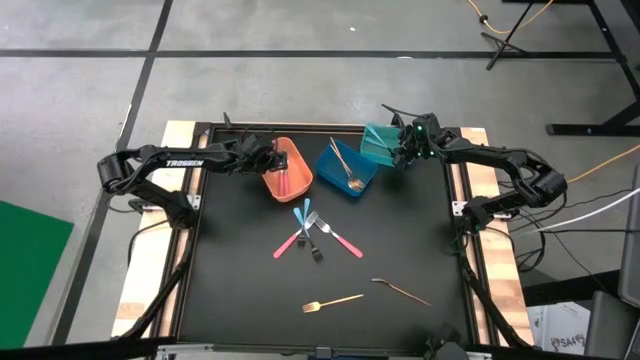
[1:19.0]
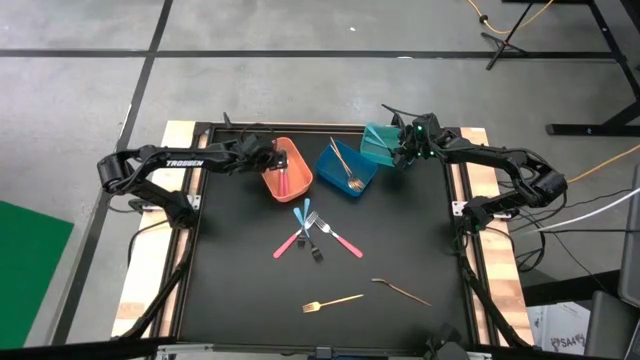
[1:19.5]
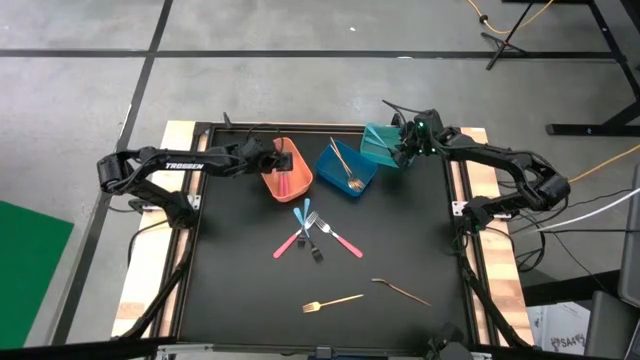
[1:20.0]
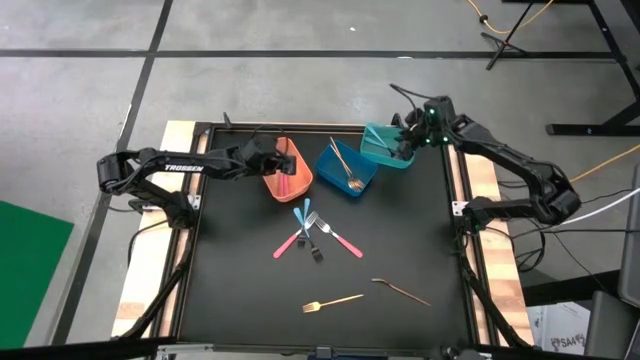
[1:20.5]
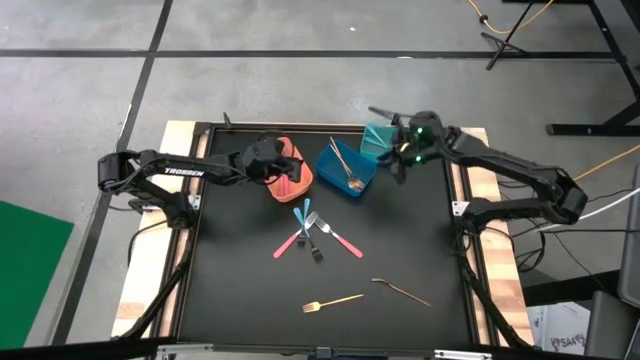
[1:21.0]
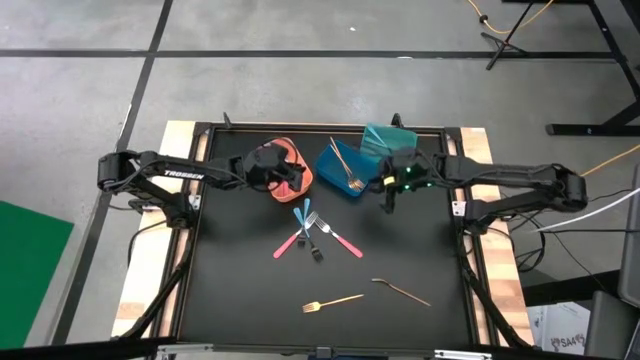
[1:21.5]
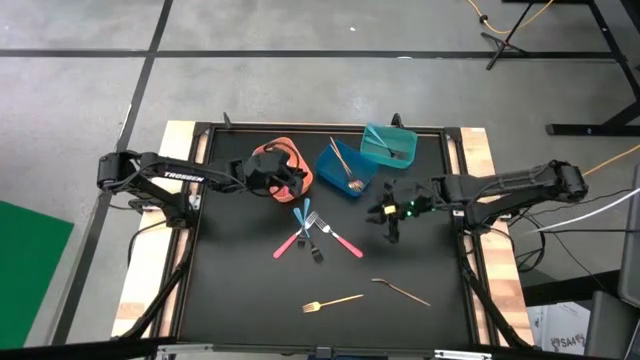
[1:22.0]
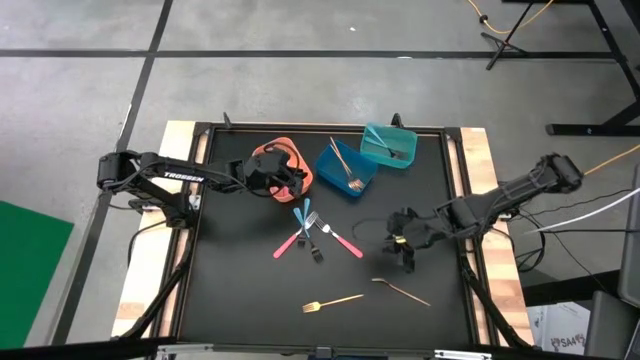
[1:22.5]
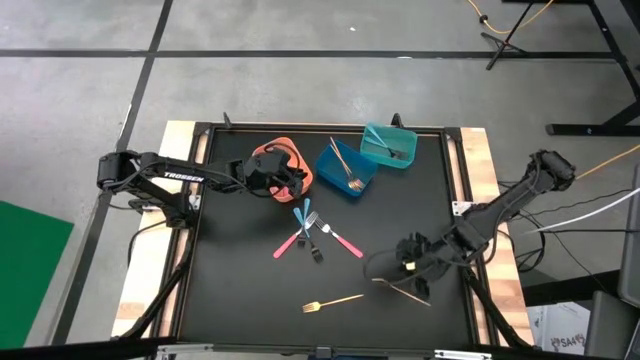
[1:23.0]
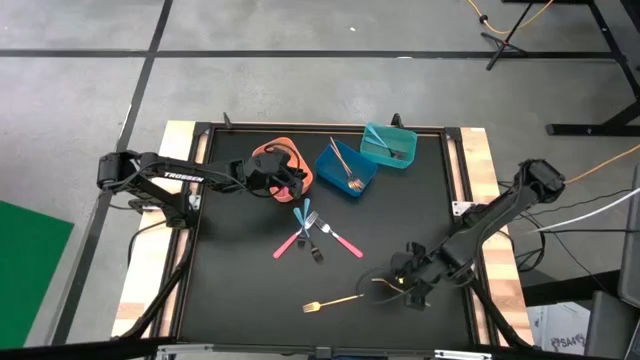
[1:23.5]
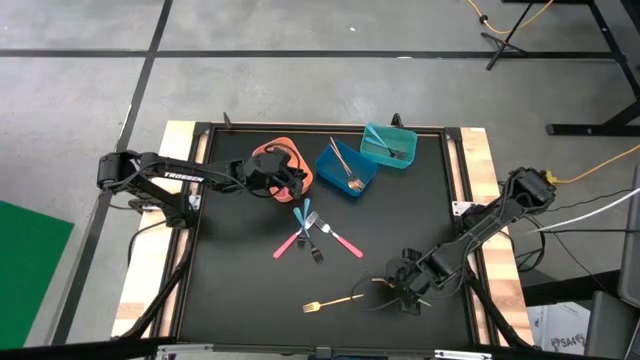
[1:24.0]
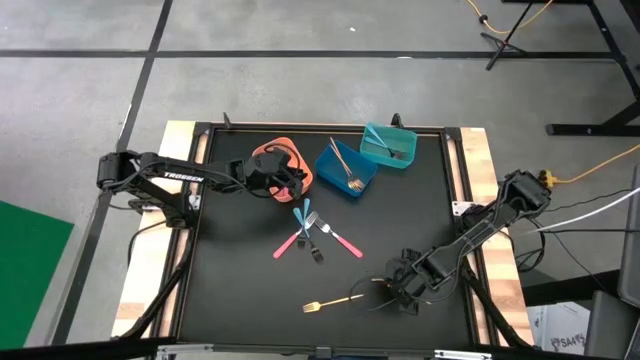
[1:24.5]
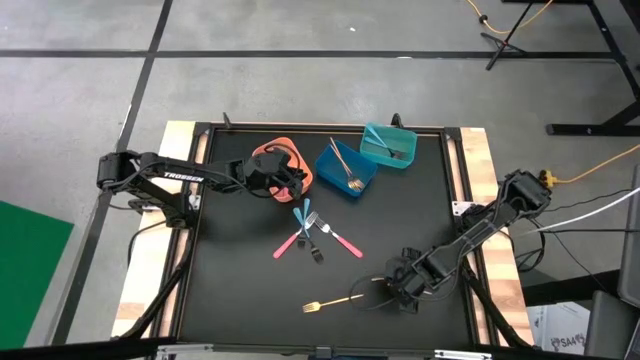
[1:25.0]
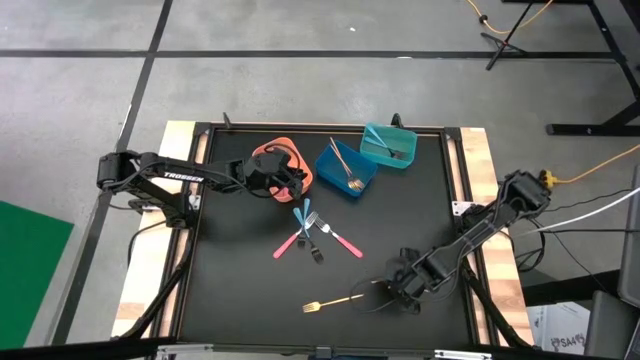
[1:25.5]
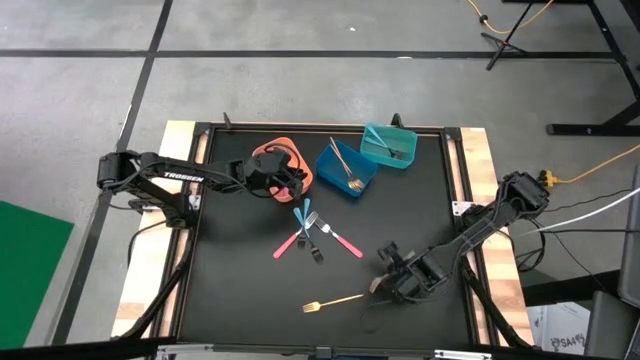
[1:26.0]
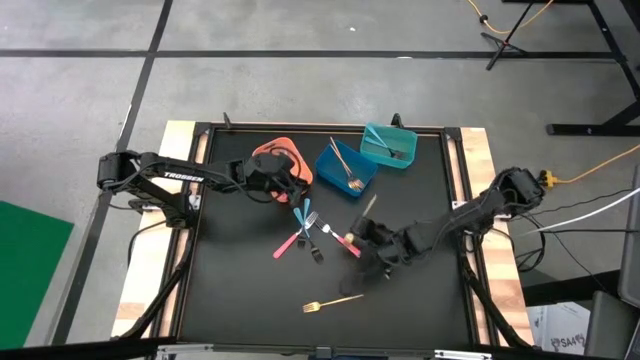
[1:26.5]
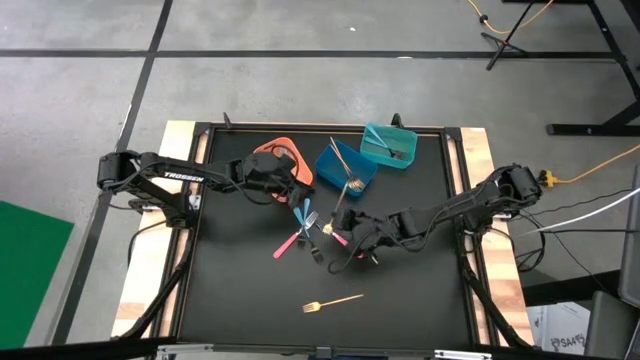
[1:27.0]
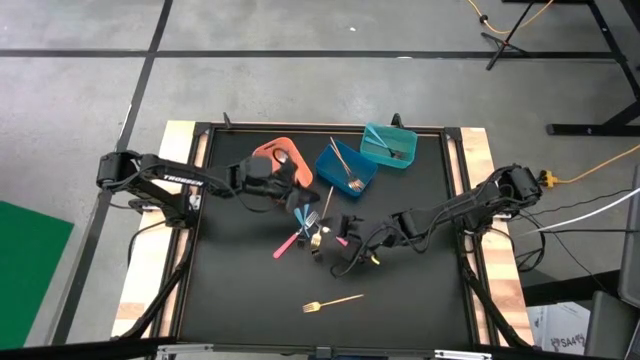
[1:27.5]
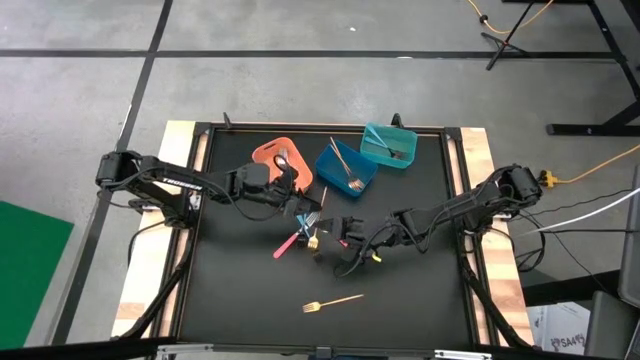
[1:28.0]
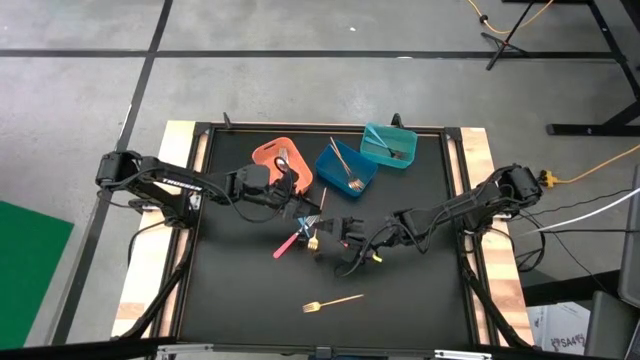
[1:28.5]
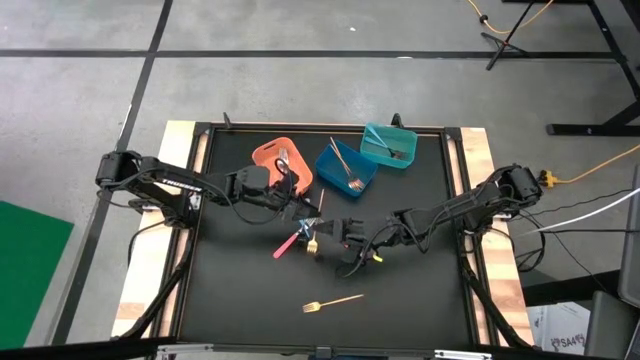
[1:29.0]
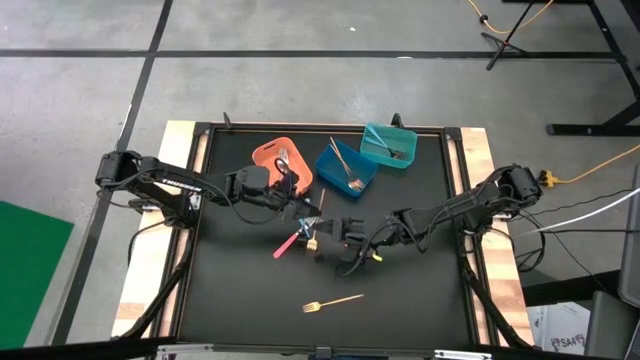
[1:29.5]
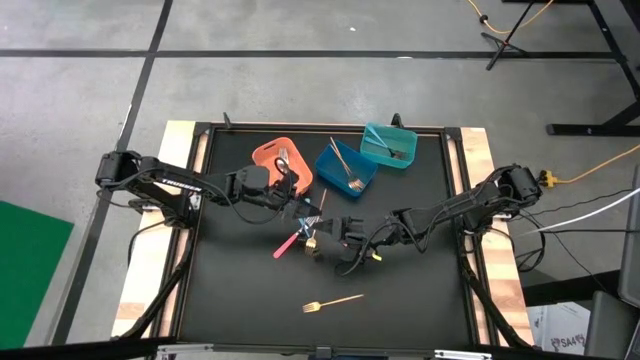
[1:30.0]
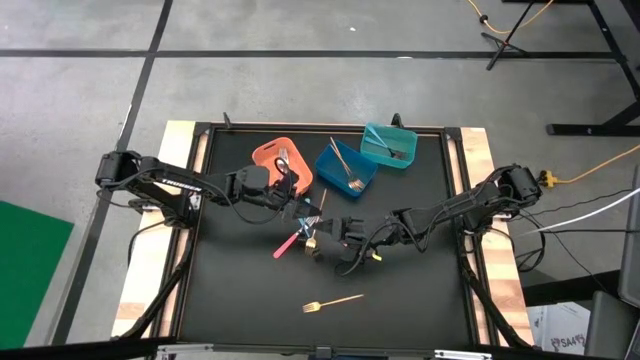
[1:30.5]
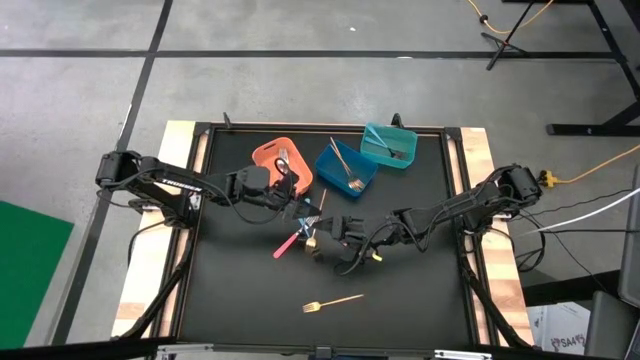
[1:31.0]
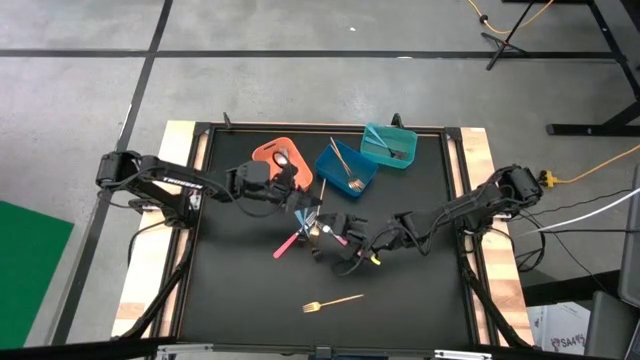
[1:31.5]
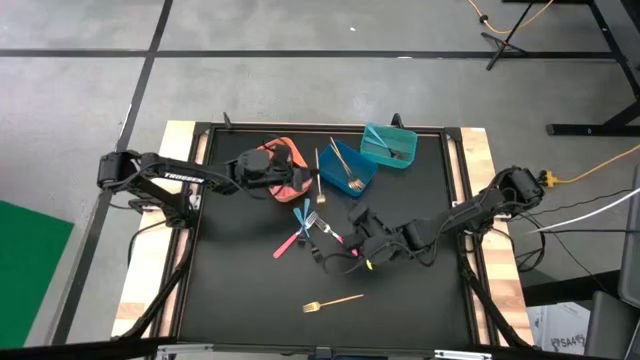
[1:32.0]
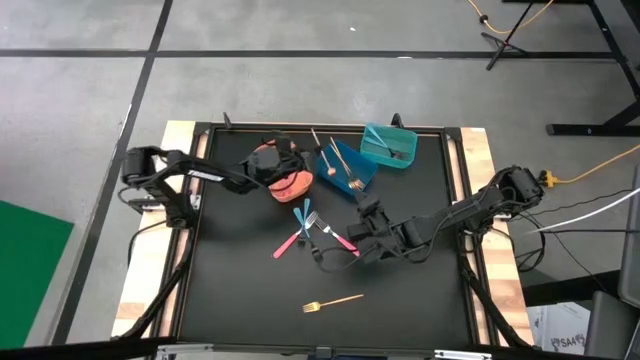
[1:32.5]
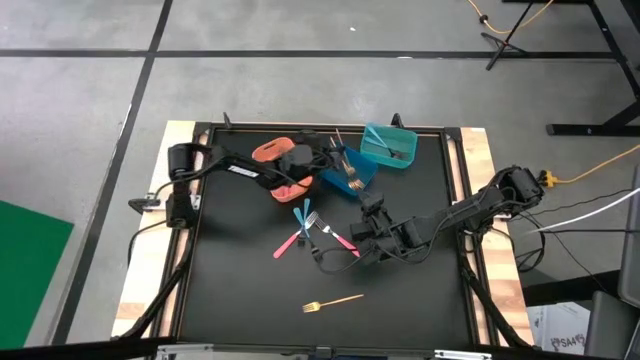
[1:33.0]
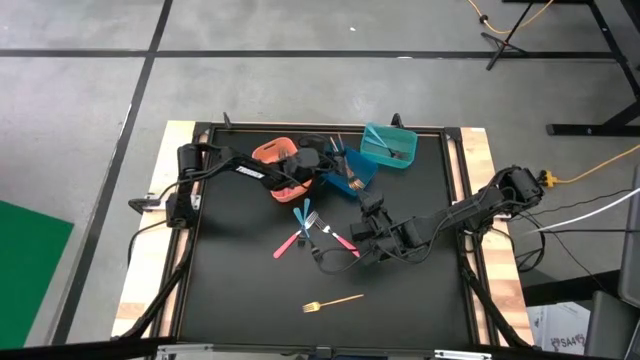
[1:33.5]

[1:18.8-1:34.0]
Task: Sort silverware by color (type)
Put the gold fork into the blue bin

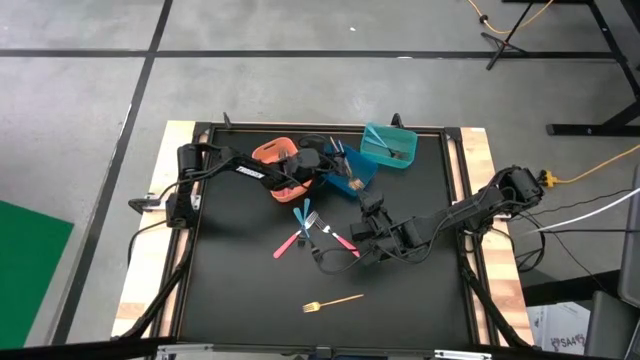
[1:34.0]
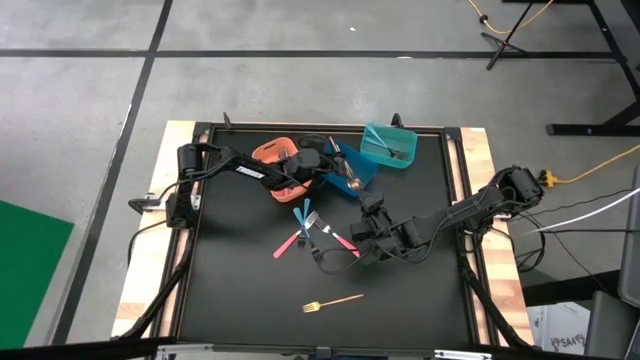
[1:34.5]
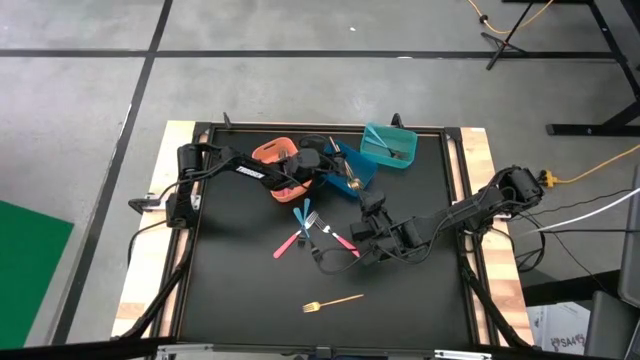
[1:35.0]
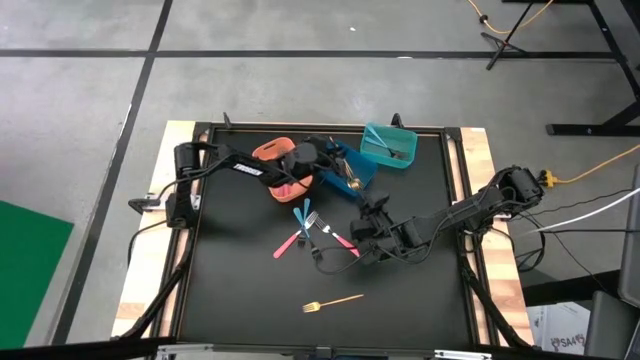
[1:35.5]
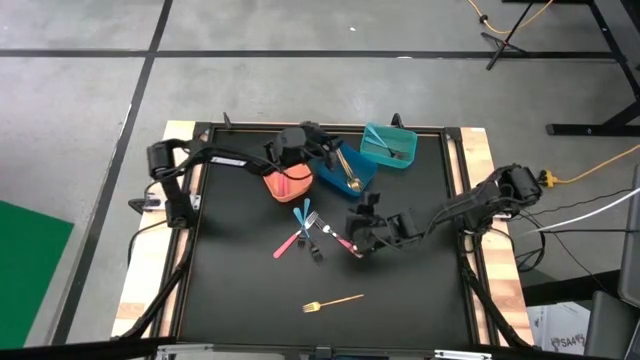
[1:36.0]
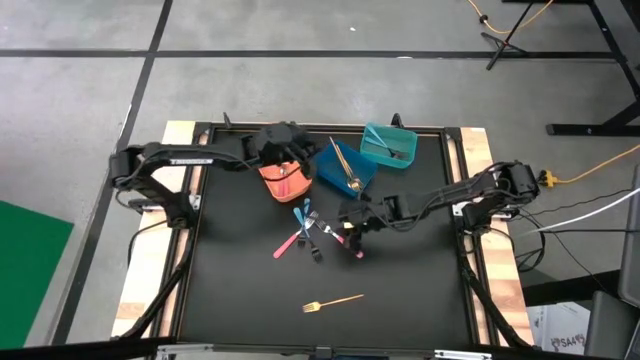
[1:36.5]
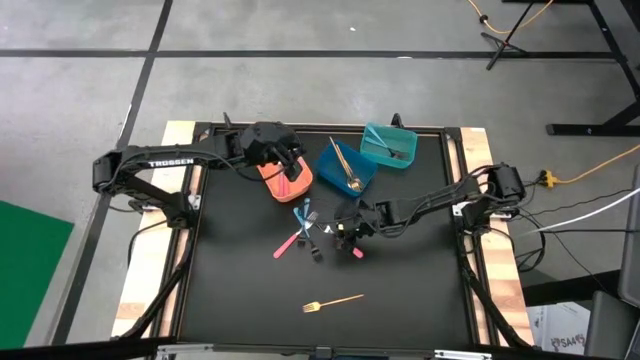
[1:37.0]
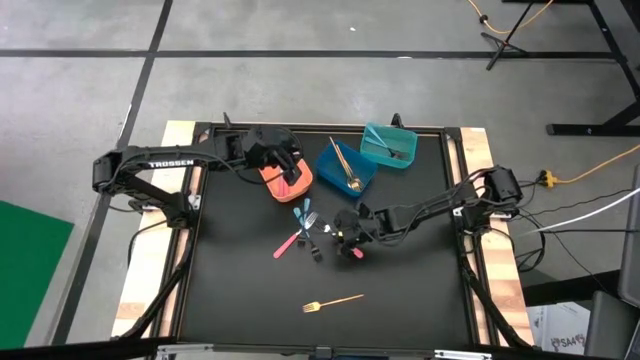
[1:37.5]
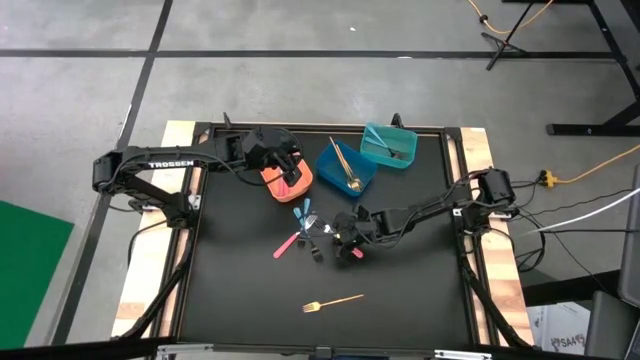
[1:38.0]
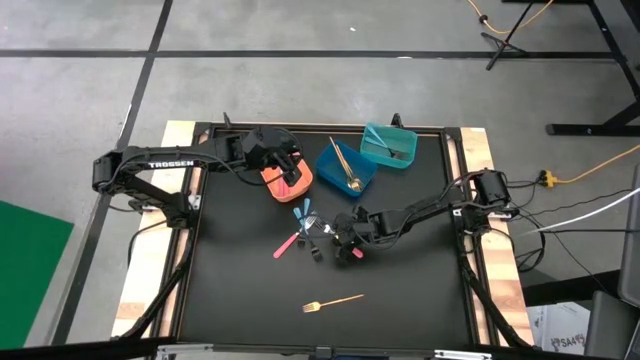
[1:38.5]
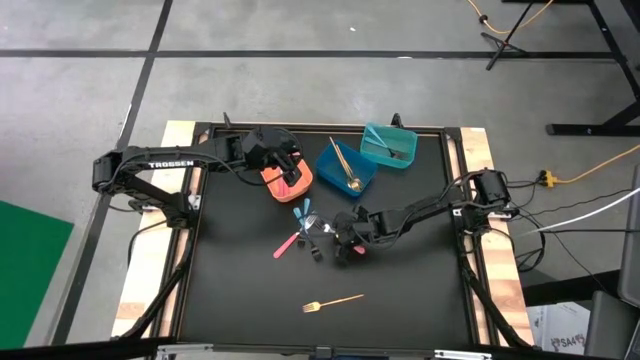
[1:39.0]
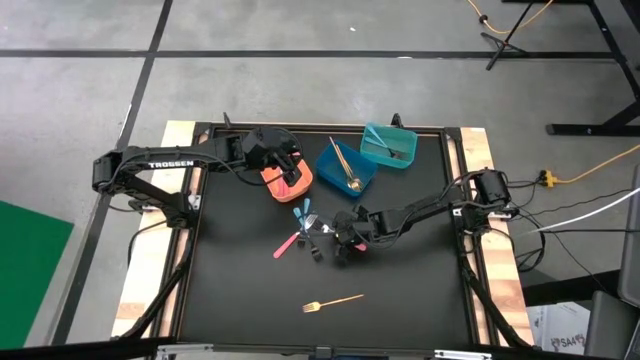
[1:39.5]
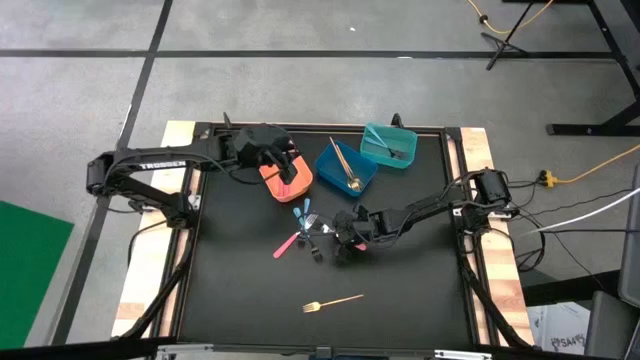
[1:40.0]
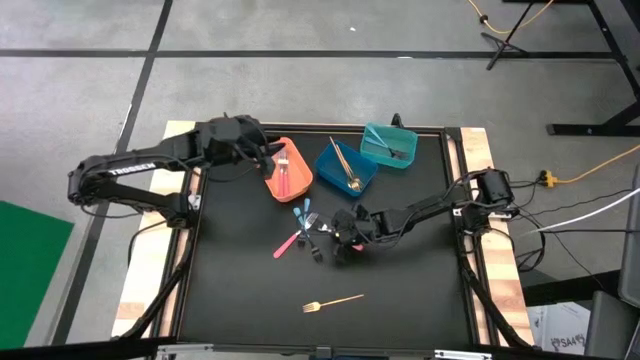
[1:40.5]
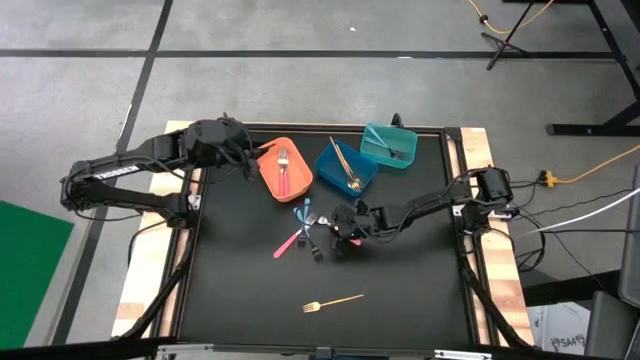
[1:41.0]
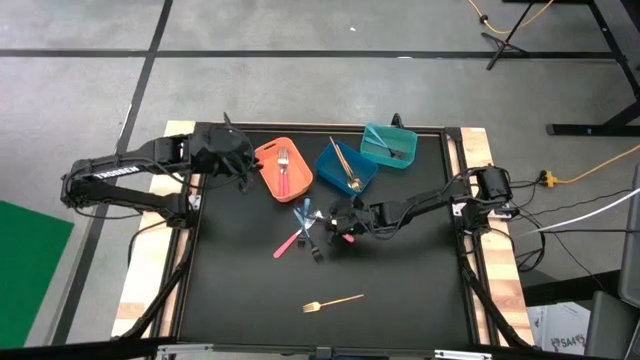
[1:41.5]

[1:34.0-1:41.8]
Put the pink fork into the orange bin
